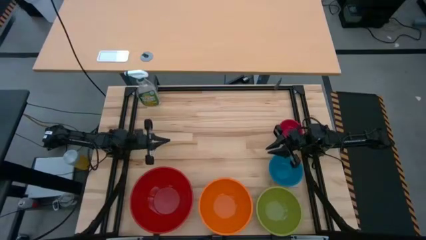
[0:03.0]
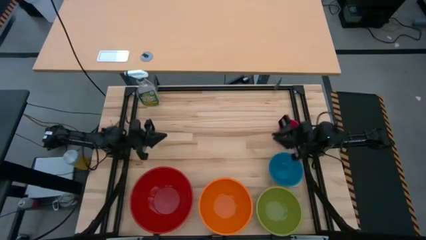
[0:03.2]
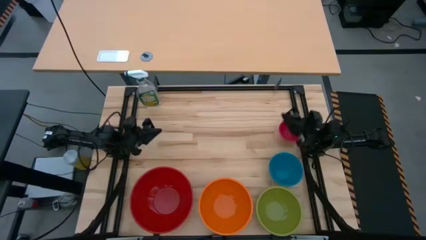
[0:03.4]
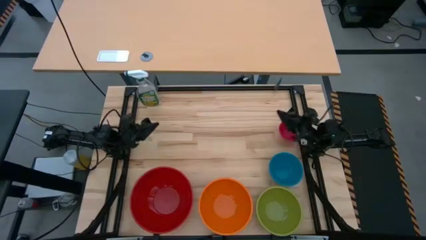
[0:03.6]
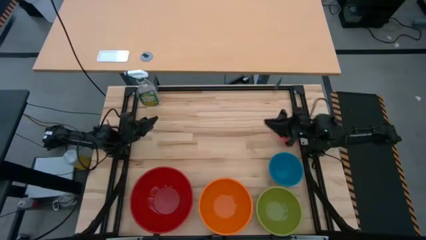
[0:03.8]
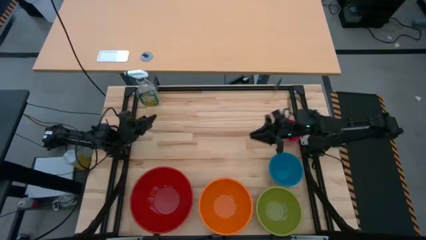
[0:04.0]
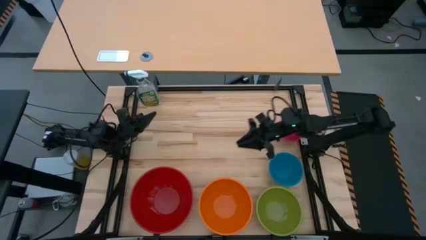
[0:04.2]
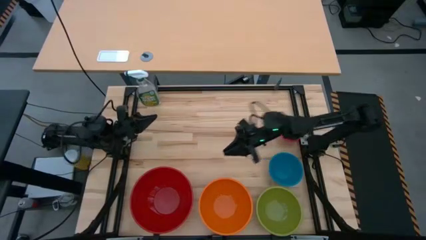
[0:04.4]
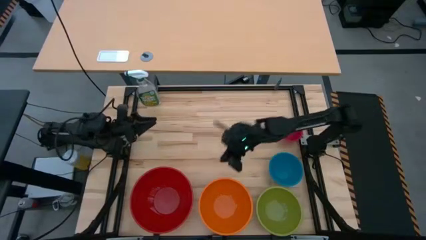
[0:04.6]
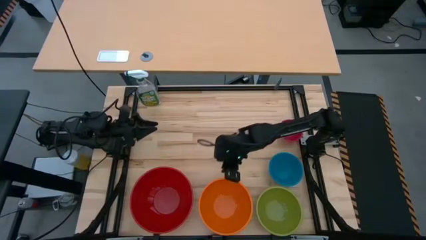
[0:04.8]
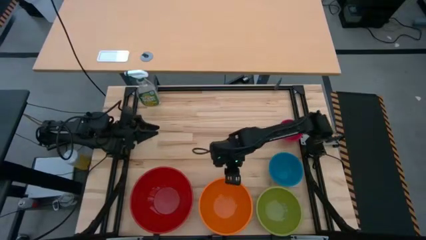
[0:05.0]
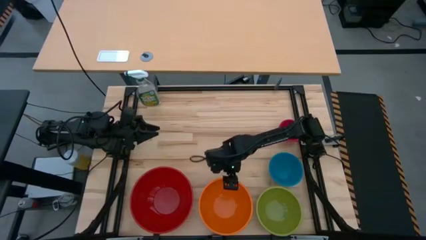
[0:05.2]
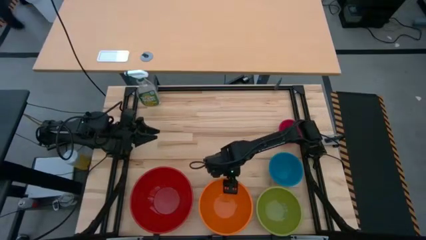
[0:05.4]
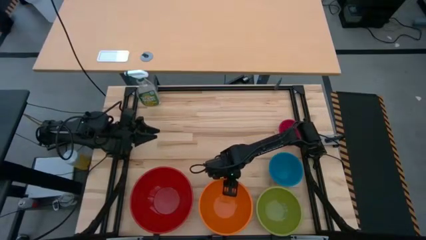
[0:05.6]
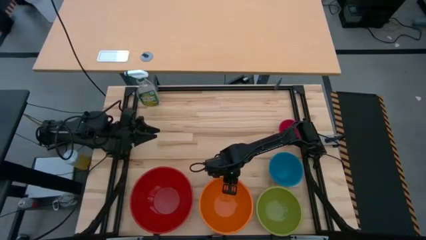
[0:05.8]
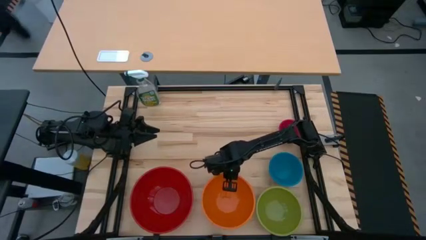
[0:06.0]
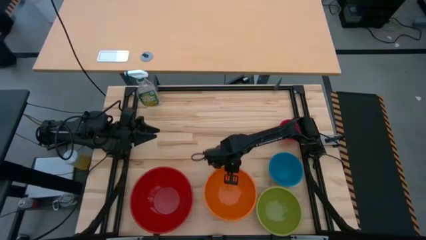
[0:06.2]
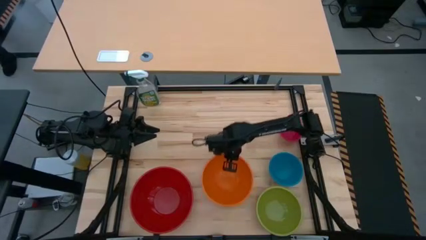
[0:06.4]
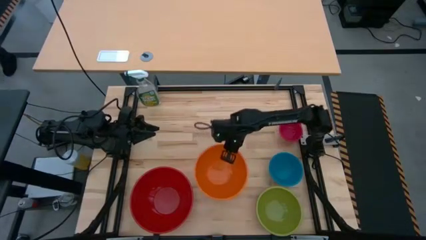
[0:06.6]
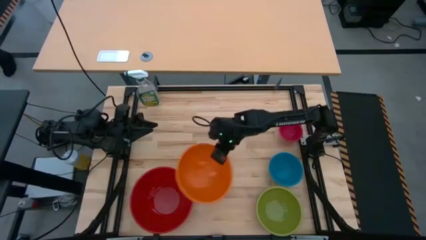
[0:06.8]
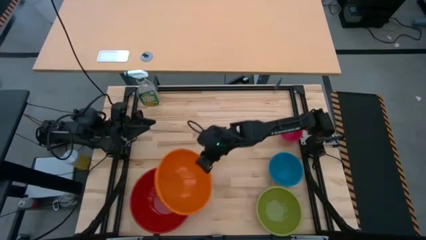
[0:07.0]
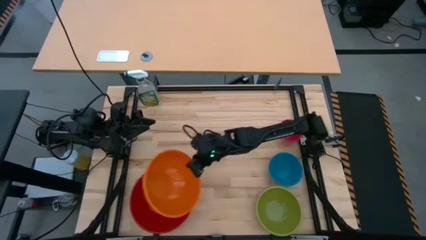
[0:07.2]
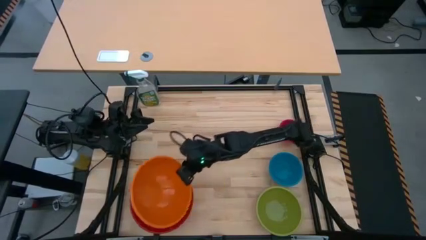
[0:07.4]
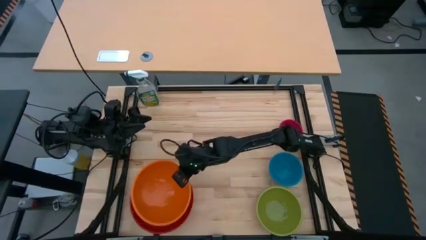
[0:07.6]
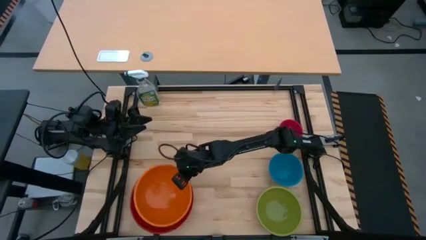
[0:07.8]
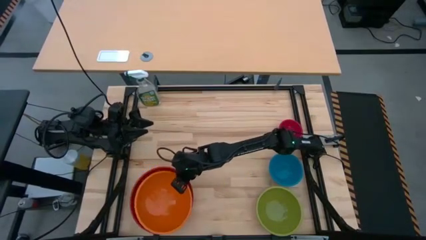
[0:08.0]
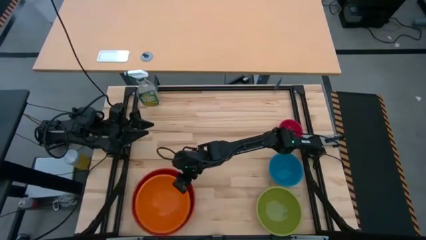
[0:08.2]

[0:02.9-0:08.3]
Stack the orange bowl on top of the red bowl

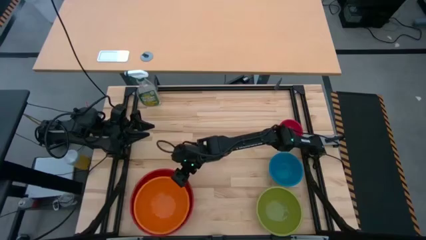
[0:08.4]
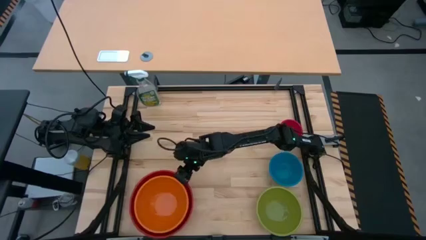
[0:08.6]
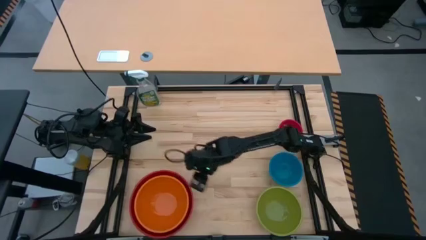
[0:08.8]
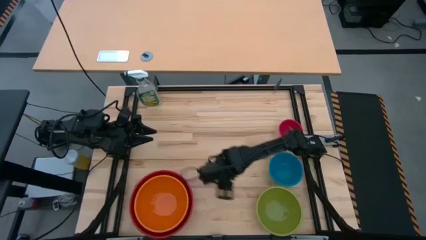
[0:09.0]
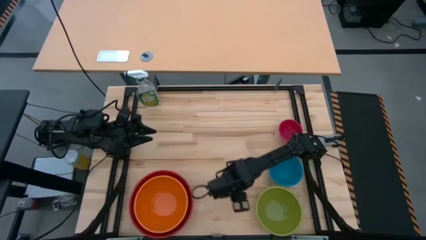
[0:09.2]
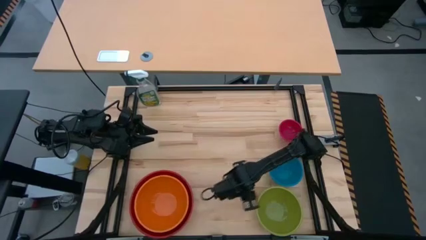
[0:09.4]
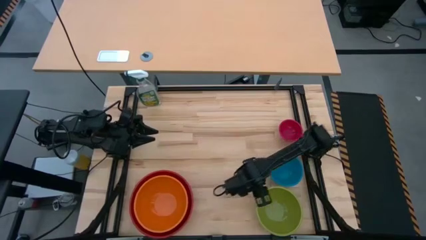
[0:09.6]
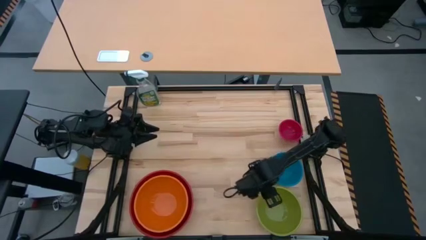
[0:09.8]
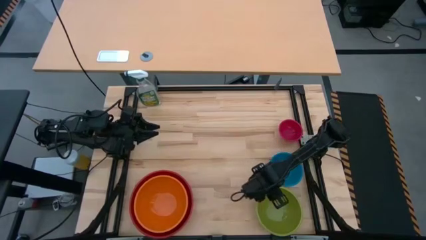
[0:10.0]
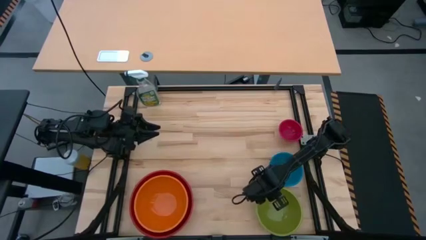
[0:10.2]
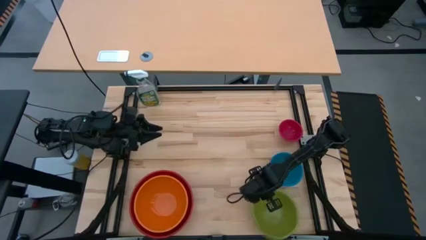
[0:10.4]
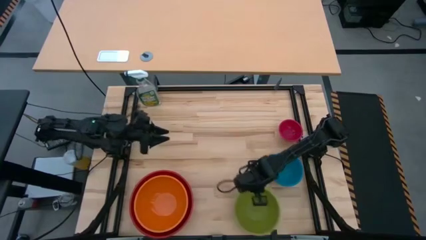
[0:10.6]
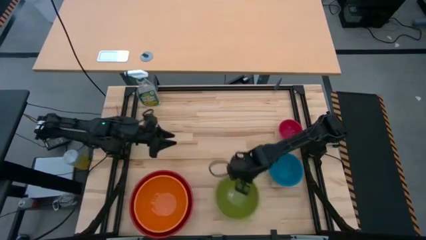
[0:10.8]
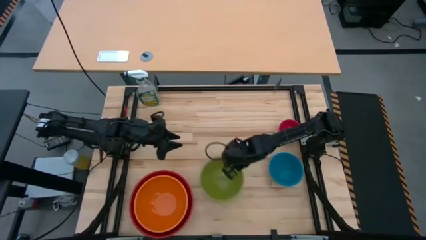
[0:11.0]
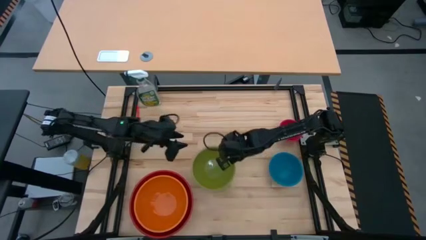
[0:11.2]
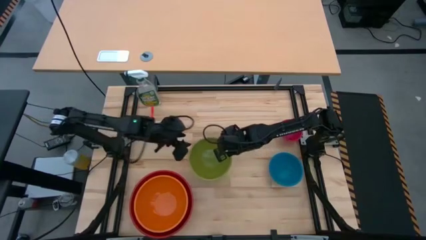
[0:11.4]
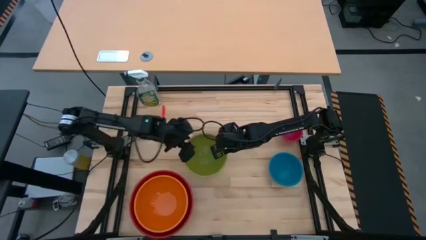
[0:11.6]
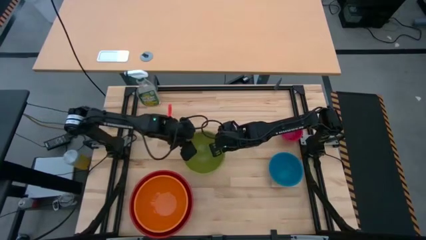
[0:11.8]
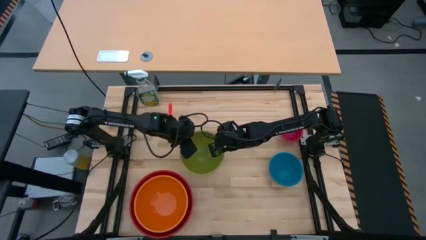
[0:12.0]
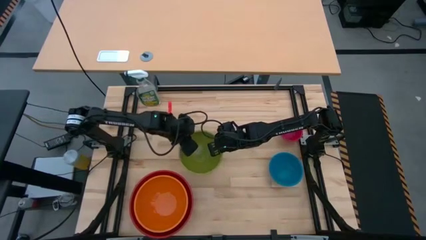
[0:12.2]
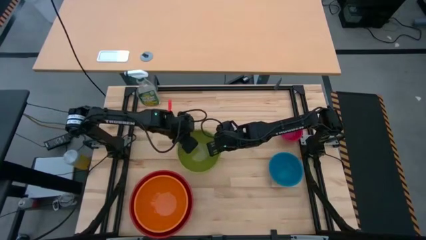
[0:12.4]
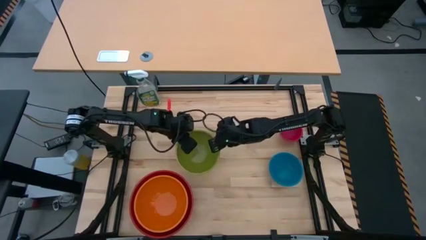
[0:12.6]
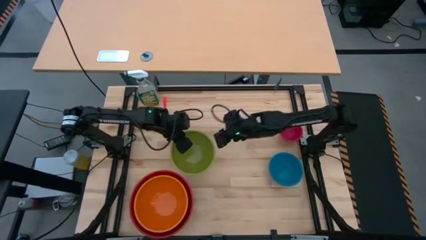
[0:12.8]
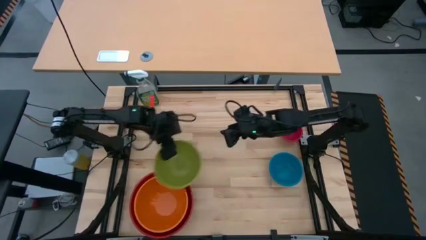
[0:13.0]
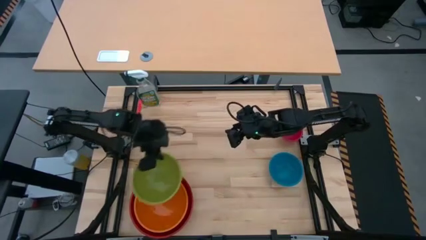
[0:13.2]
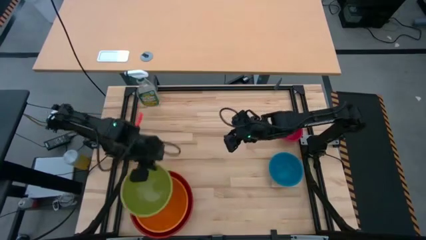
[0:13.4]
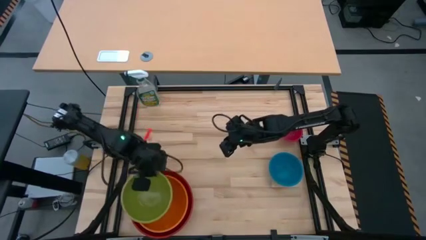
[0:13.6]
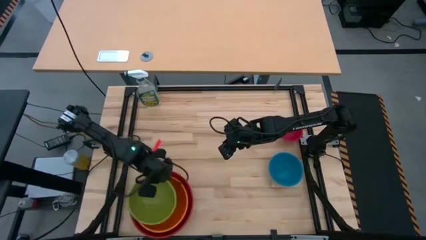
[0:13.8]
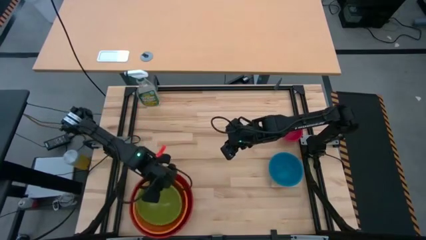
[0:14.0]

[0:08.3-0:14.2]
Stack the green bowl on top of the orange bowl

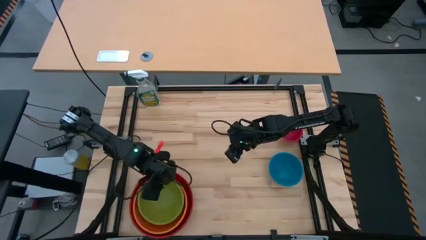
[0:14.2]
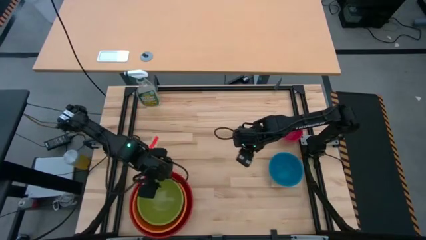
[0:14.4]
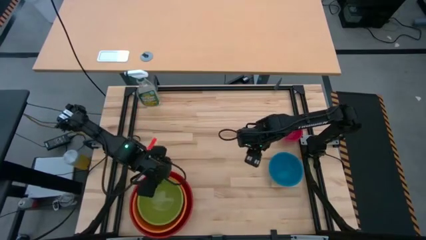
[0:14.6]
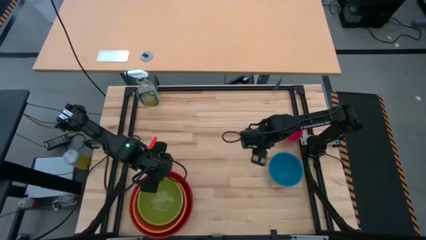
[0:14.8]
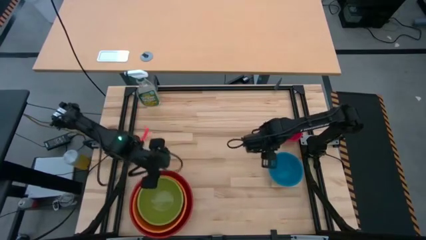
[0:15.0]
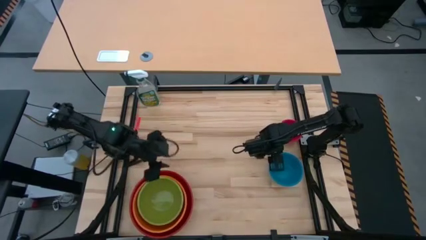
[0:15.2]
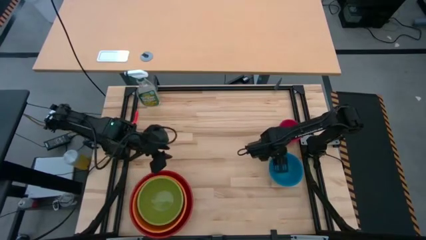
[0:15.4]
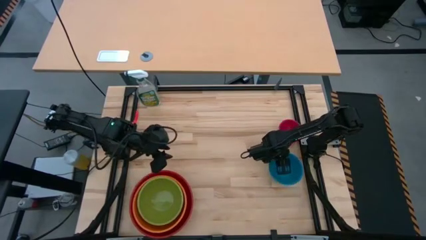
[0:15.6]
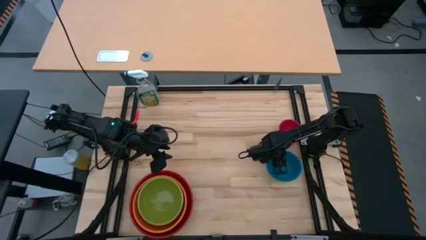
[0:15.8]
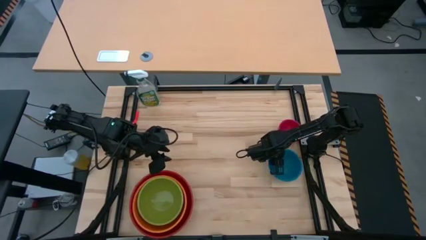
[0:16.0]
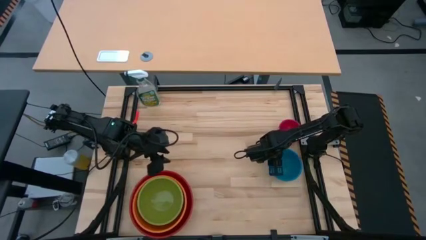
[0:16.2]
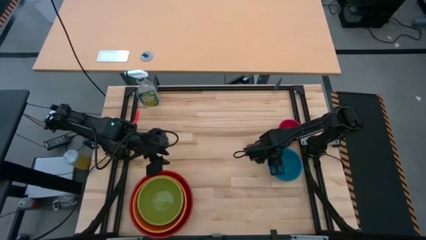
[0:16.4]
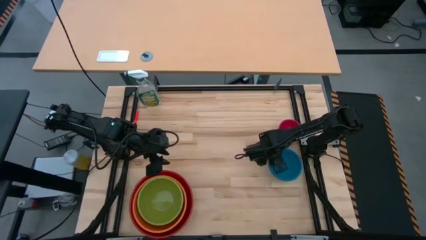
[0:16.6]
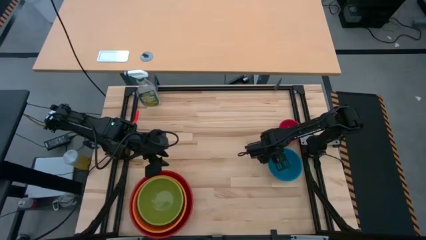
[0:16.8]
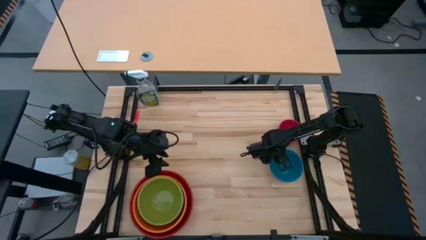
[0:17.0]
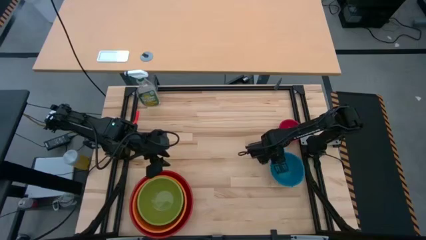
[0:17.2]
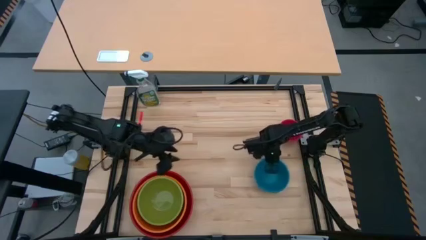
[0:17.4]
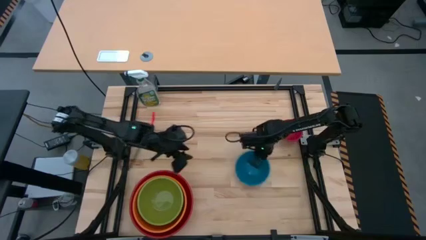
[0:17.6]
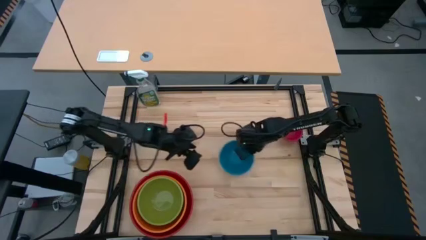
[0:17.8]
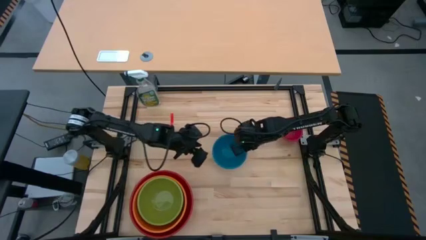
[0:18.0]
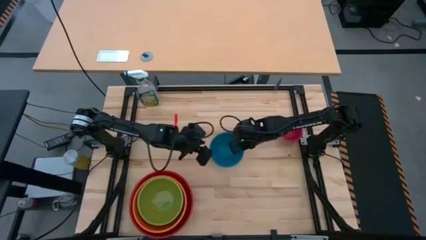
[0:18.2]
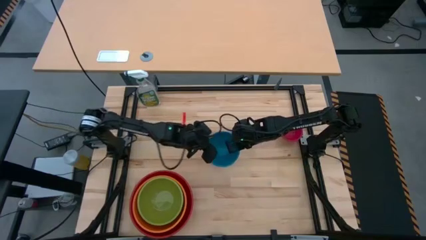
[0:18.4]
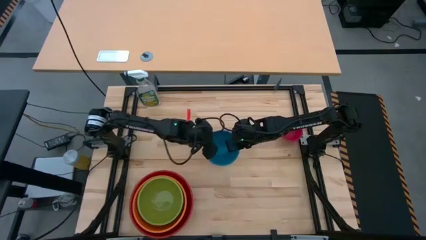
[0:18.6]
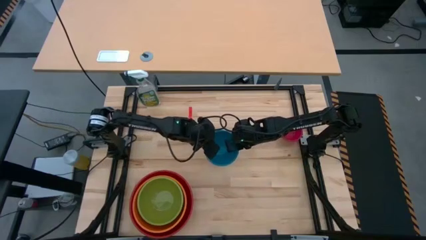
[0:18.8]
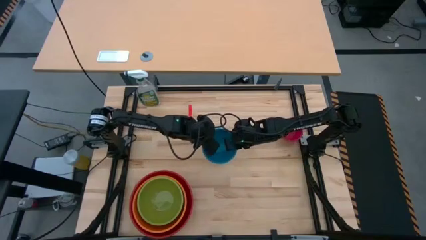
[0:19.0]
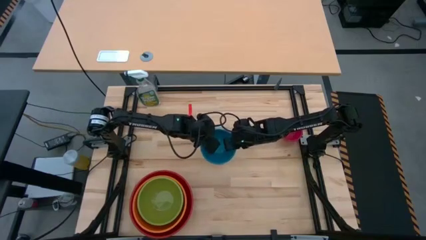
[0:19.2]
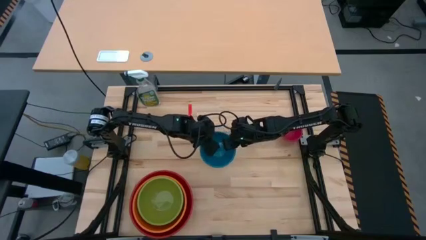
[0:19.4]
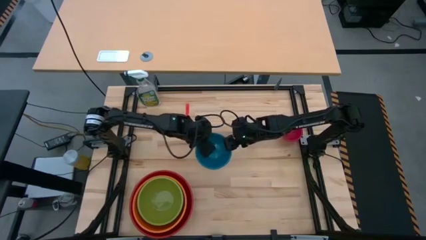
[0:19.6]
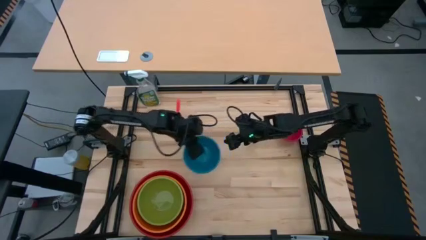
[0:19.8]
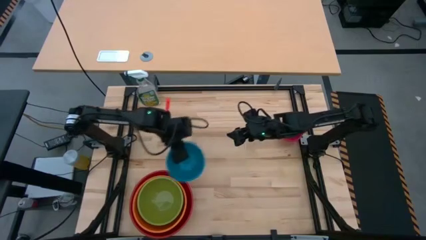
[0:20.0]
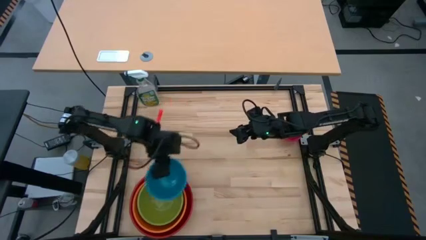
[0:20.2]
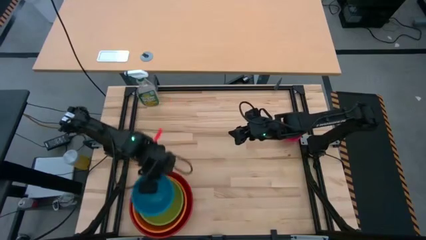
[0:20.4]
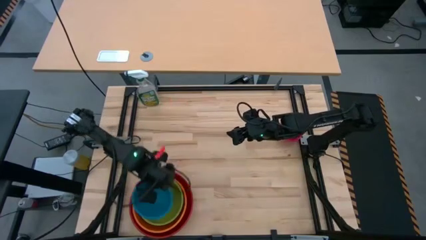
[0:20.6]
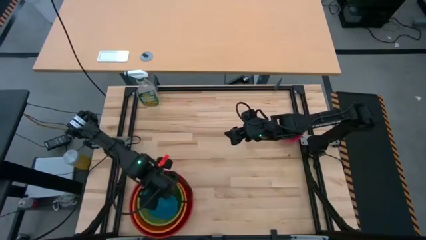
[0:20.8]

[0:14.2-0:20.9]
Stack the blue bowl on top of the green bowl
